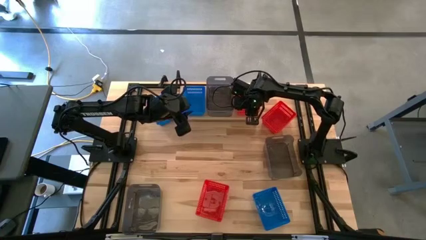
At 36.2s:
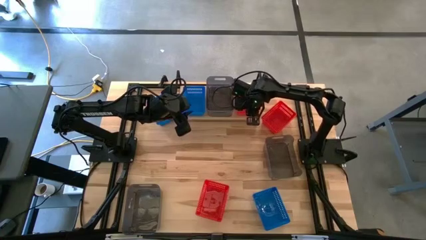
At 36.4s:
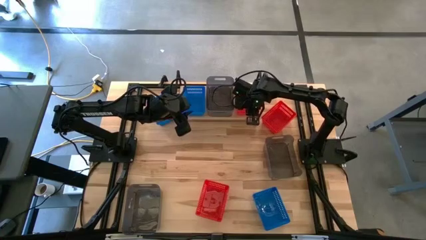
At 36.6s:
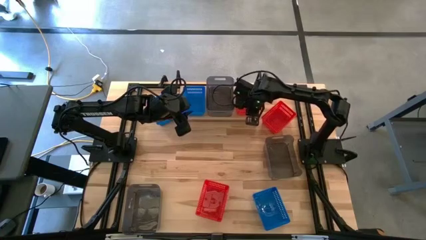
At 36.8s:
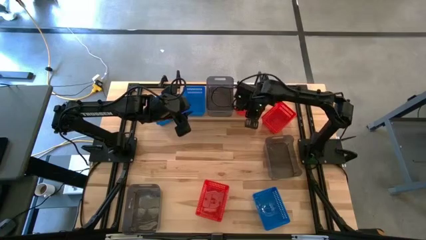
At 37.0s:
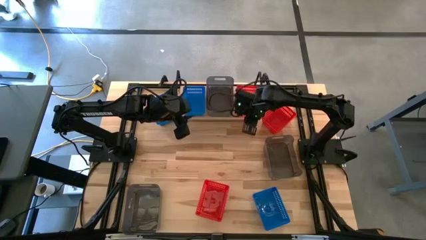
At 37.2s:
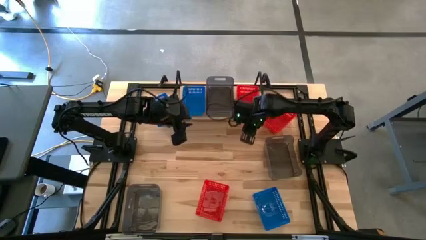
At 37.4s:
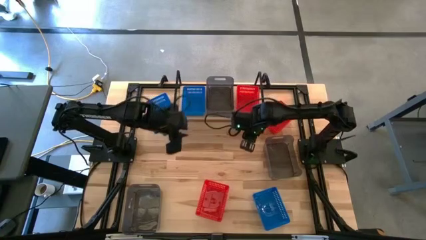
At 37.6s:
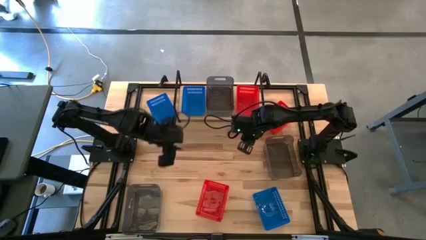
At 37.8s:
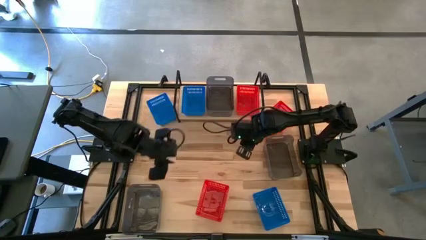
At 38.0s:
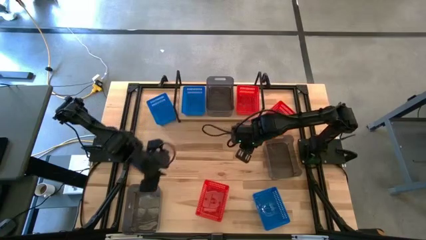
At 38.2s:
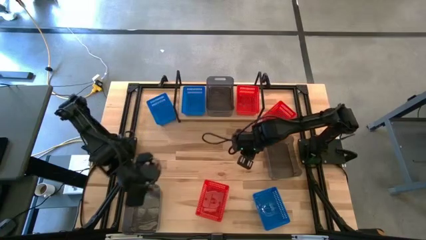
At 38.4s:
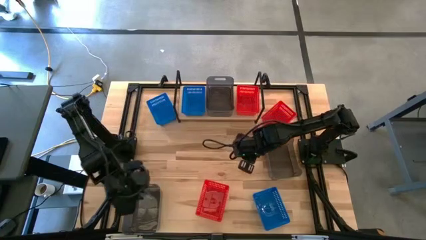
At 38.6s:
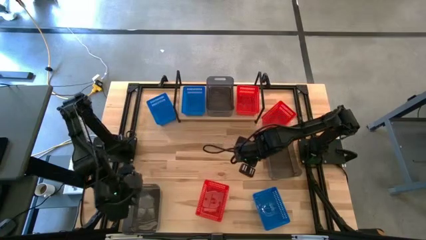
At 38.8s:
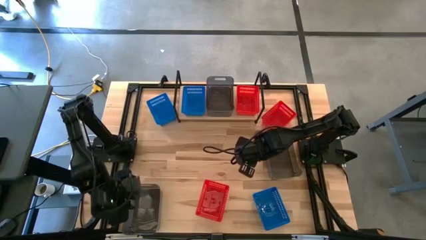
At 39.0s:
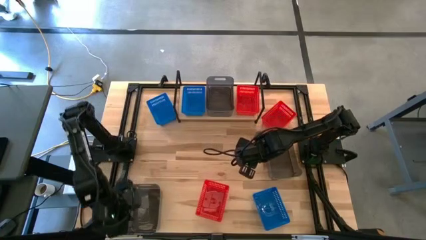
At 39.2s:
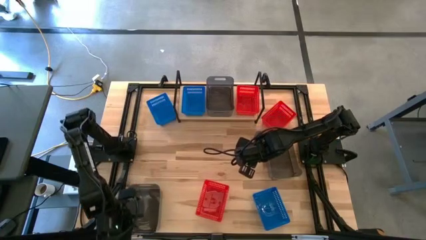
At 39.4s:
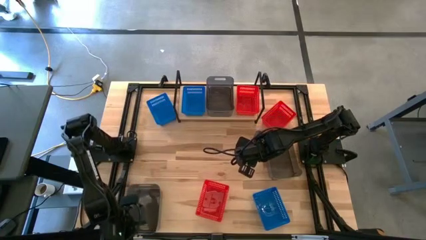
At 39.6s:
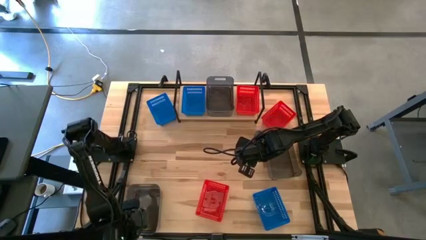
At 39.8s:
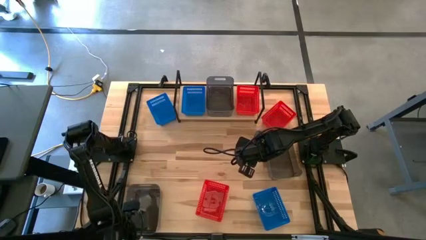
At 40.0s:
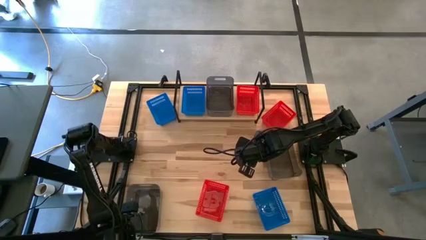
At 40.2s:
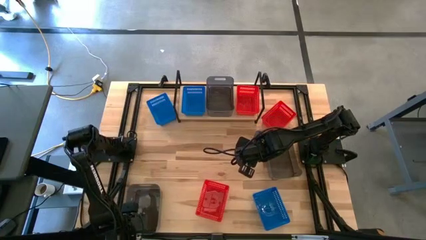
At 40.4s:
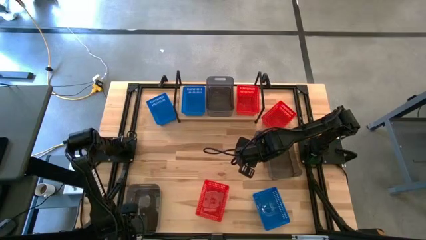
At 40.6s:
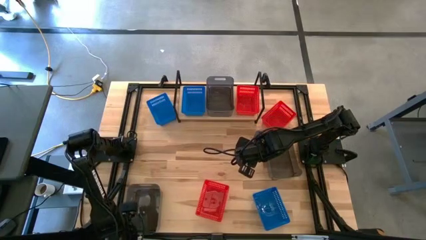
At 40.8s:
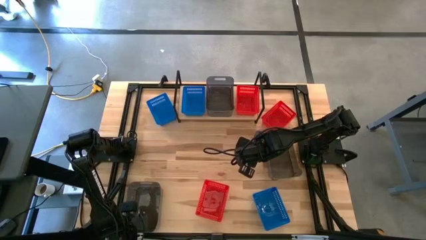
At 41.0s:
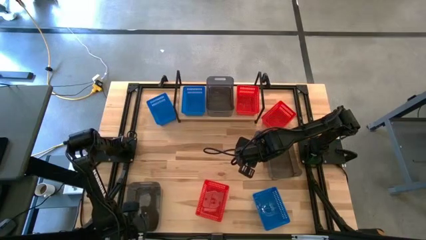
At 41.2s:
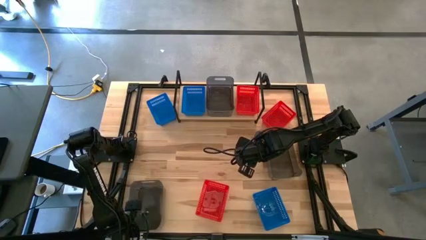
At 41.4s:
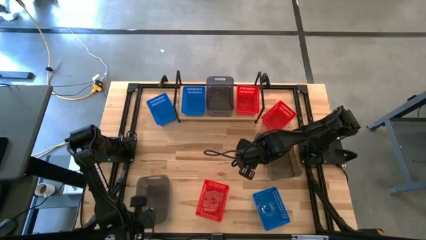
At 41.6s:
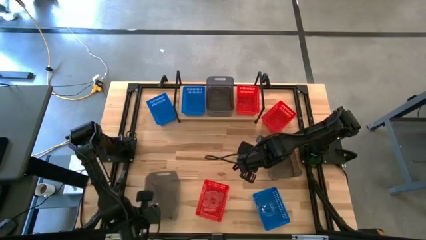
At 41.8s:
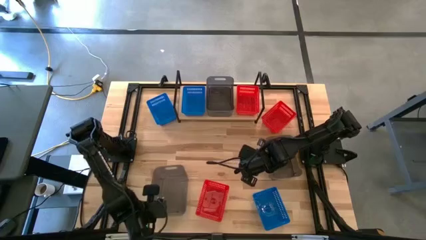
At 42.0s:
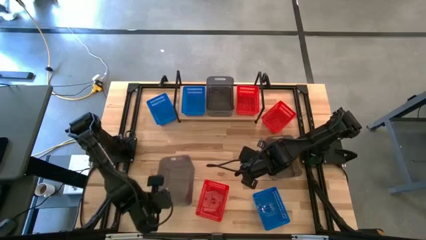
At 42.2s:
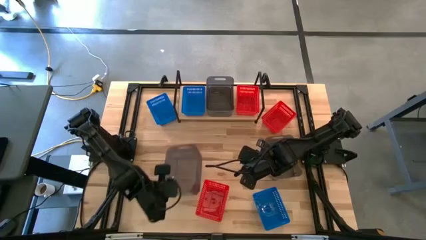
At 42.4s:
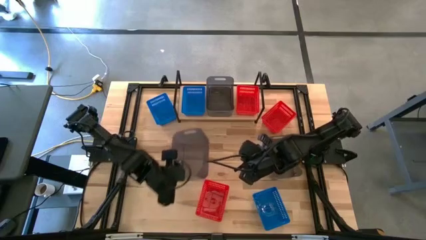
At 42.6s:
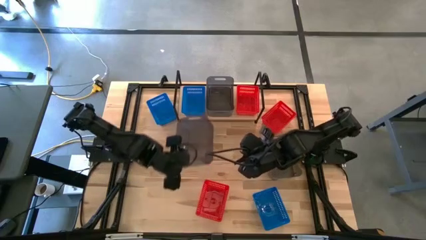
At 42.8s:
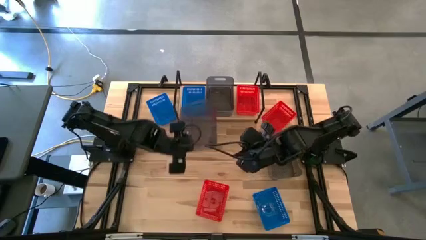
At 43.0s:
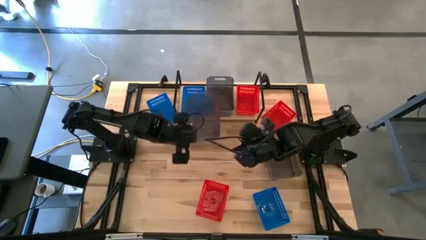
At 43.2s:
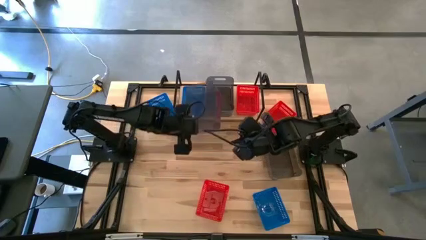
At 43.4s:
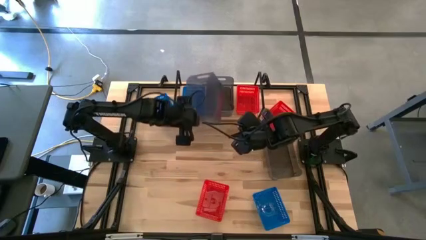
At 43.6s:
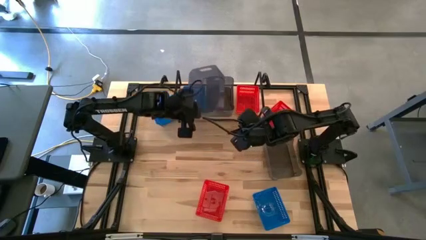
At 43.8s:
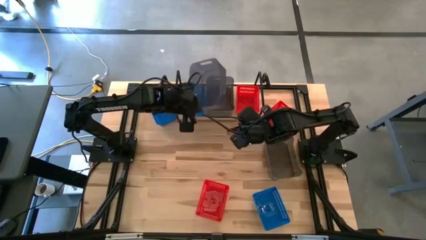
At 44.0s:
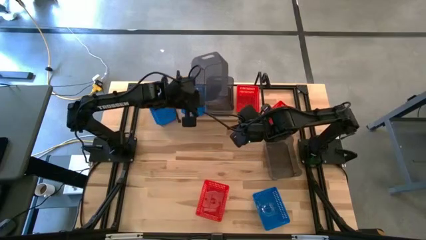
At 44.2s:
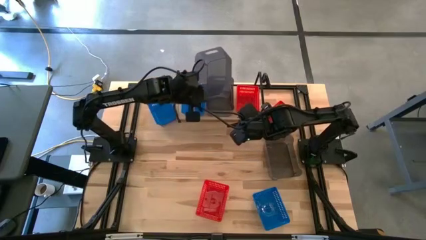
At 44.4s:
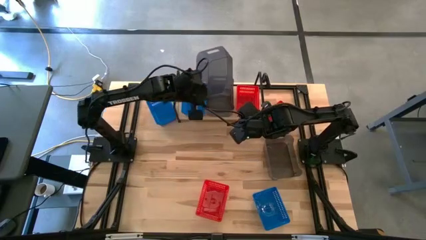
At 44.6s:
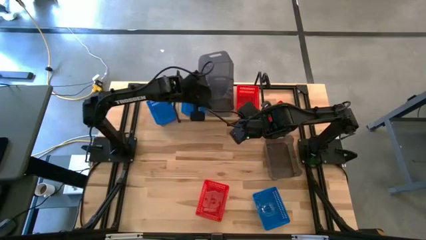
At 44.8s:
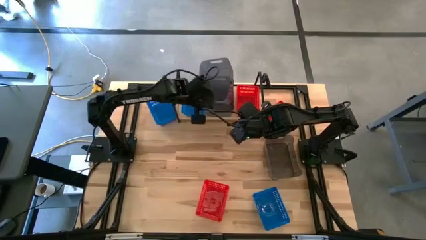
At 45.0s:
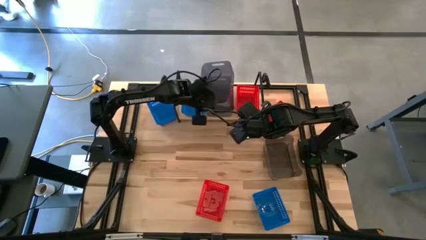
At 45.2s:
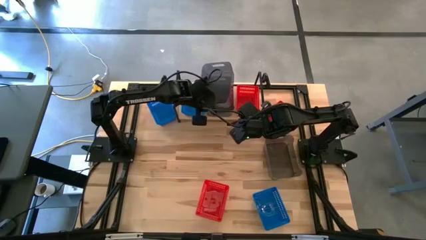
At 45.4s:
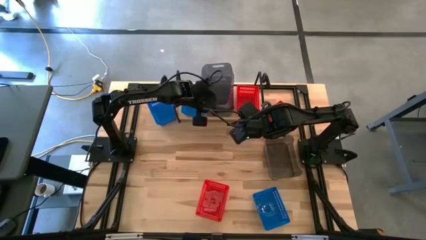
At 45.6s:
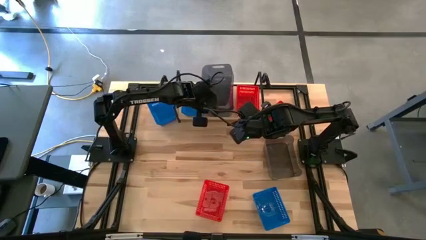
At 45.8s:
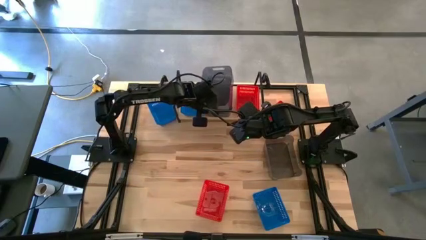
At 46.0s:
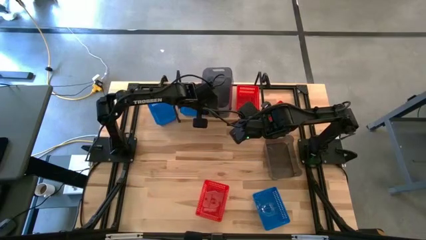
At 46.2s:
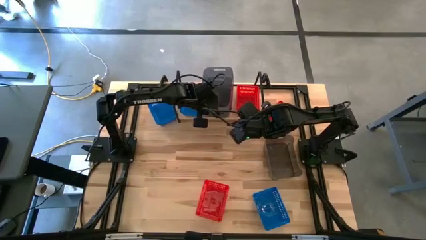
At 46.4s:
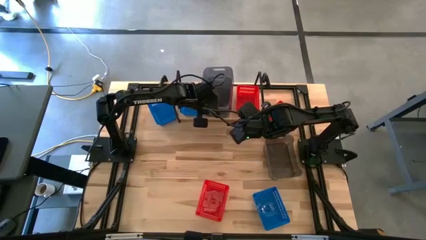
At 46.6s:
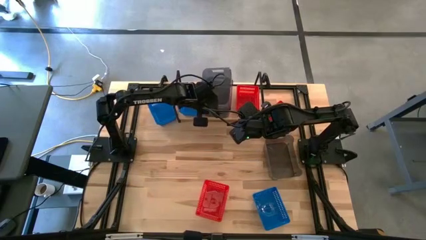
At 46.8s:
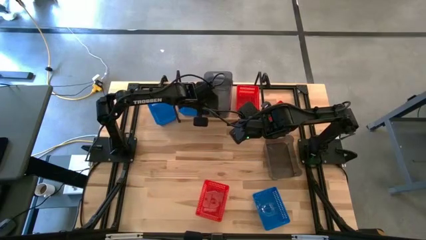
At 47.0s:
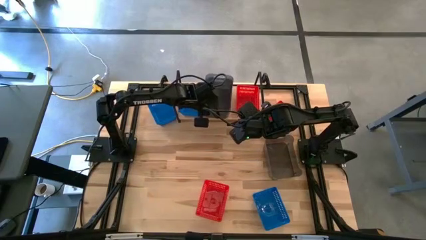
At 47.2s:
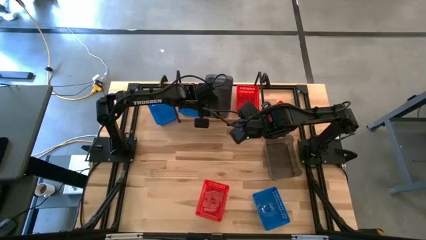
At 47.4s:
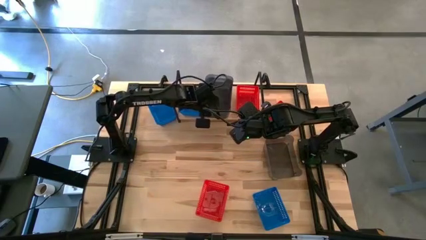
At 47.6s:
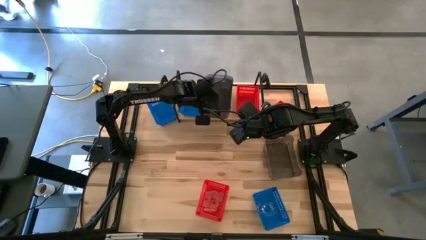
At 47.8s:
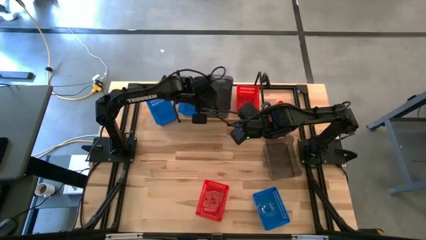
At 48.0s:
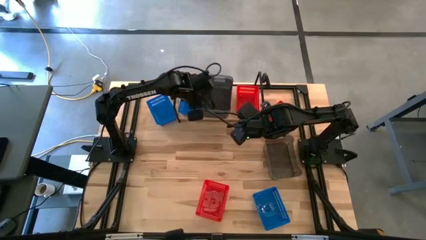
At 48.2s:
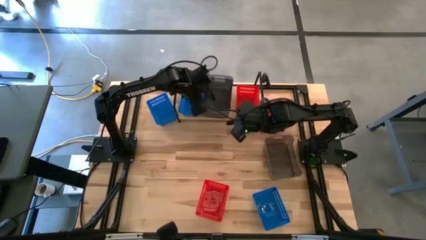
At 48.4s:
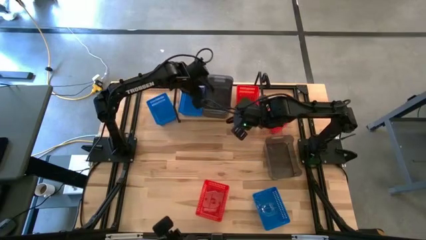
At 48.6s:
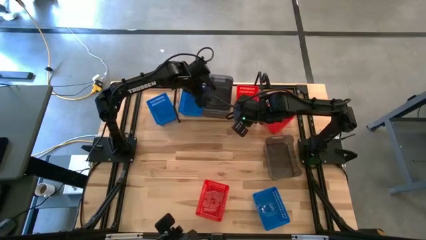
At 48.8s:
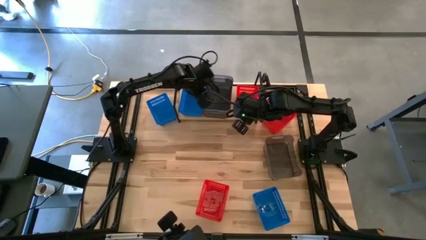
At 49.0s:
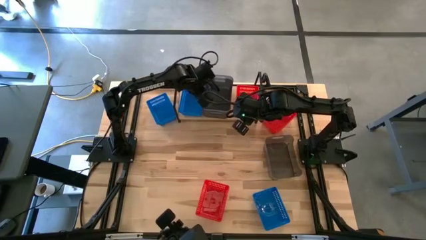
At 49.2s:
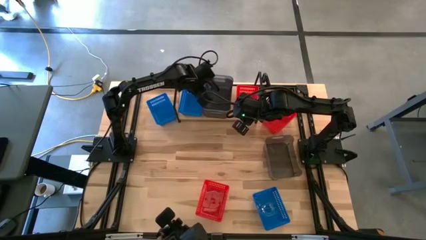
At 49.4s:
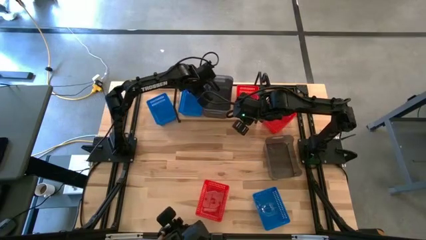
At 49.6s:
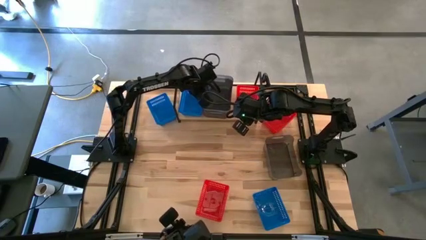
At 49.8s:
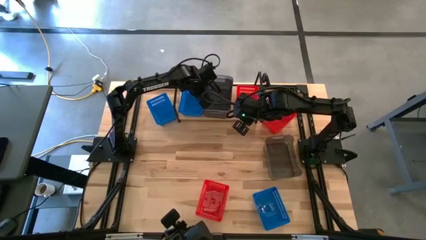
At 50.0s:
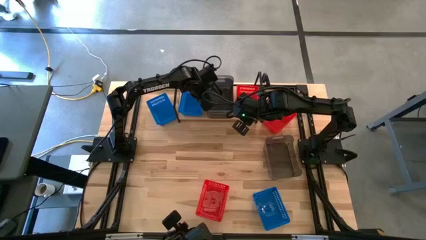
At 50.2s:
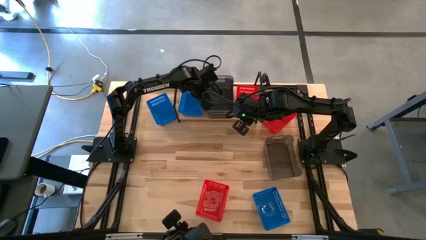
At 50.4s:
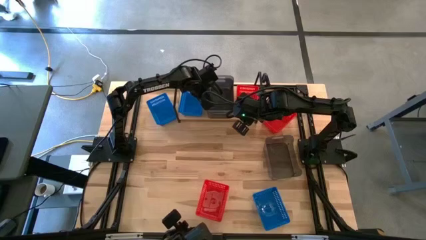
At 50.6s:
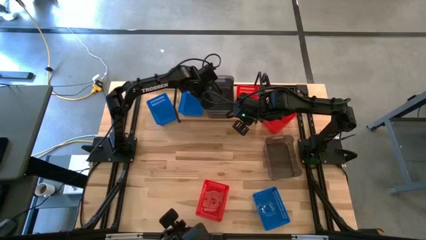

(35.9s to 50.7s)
Task: Stack baskets on shelf by color
Stack the bottom black bin on the black bin on the shelf
